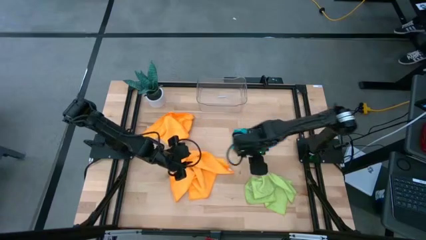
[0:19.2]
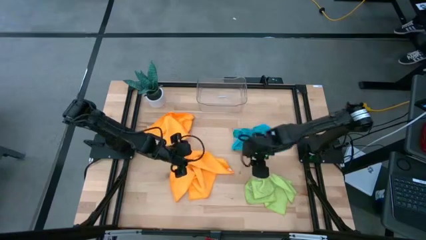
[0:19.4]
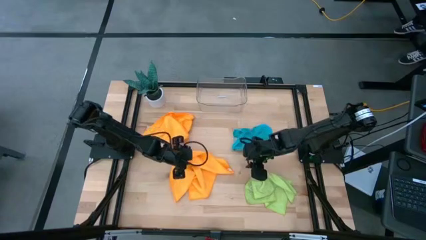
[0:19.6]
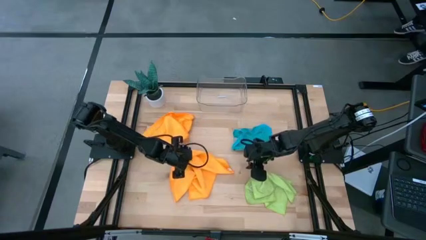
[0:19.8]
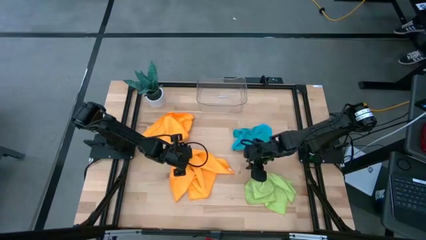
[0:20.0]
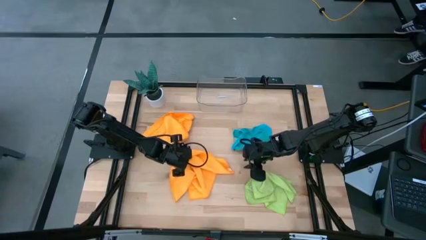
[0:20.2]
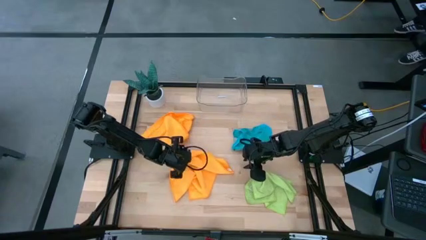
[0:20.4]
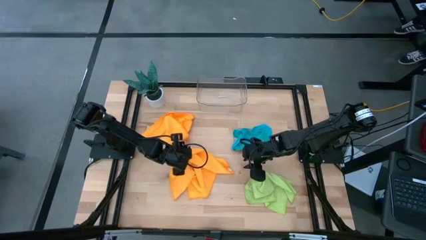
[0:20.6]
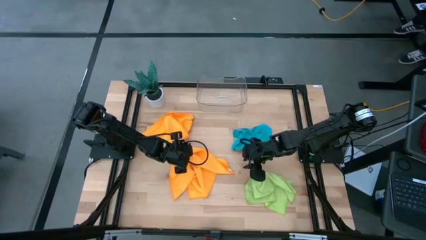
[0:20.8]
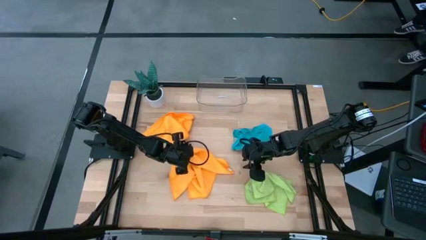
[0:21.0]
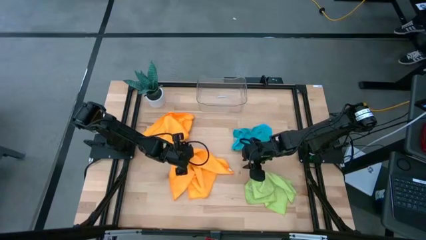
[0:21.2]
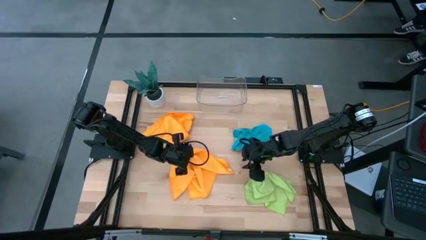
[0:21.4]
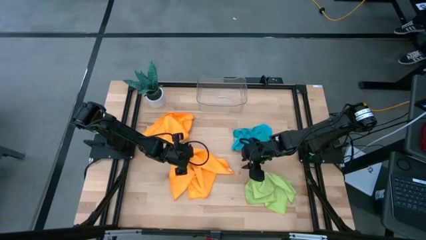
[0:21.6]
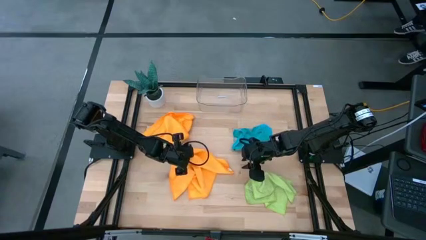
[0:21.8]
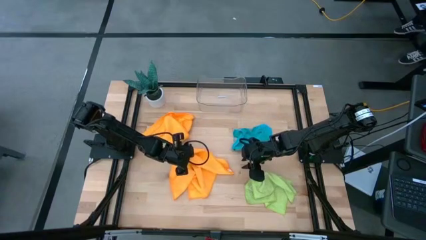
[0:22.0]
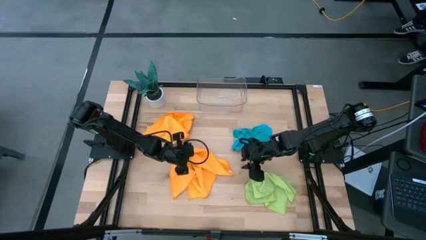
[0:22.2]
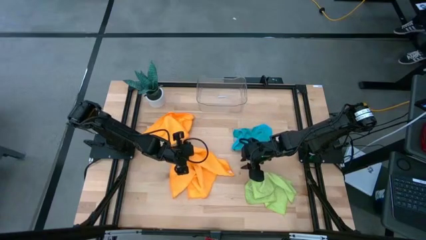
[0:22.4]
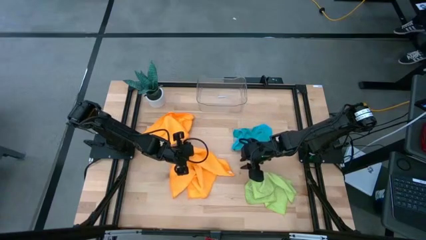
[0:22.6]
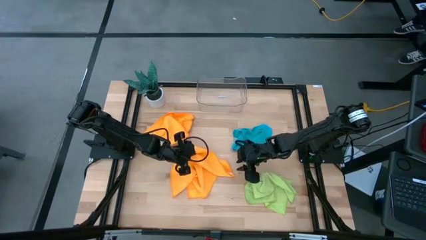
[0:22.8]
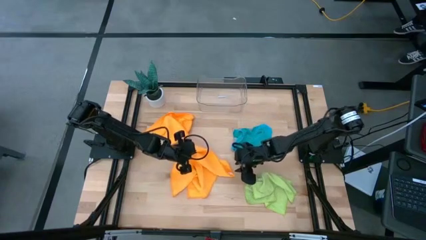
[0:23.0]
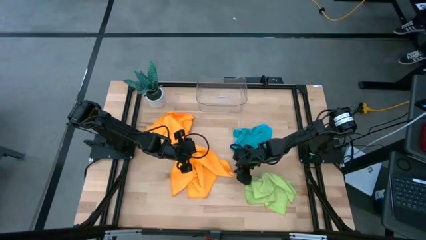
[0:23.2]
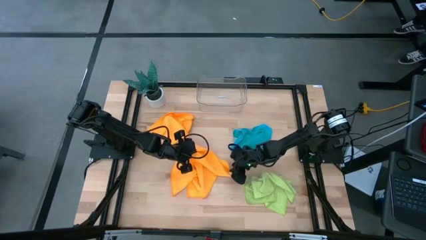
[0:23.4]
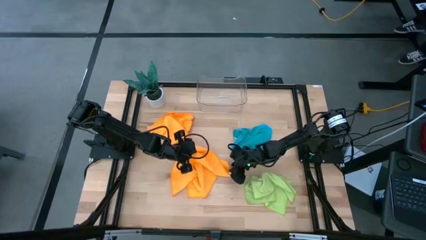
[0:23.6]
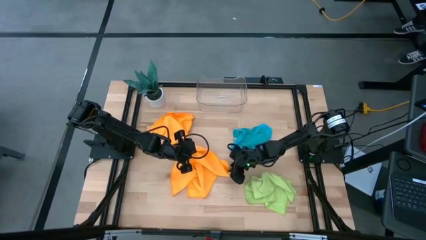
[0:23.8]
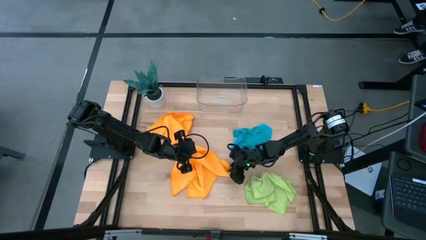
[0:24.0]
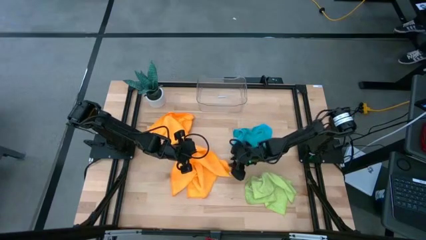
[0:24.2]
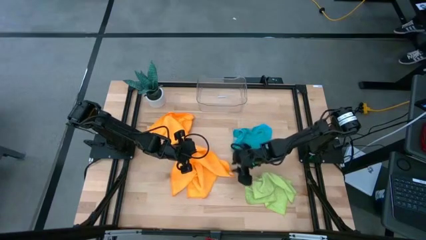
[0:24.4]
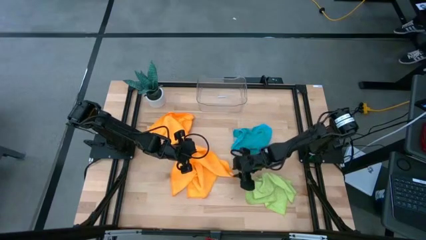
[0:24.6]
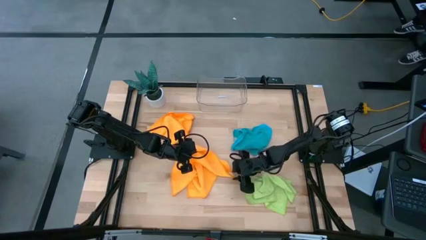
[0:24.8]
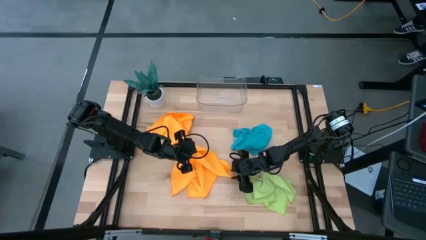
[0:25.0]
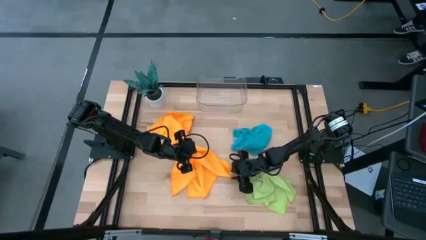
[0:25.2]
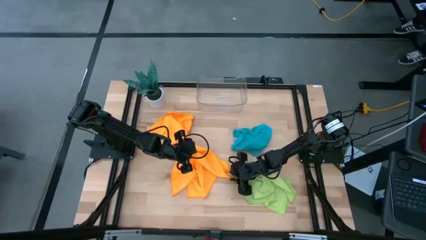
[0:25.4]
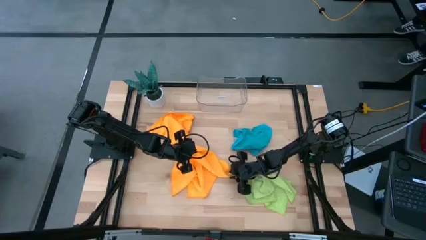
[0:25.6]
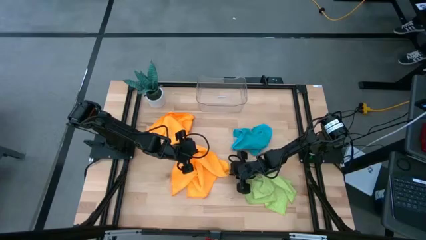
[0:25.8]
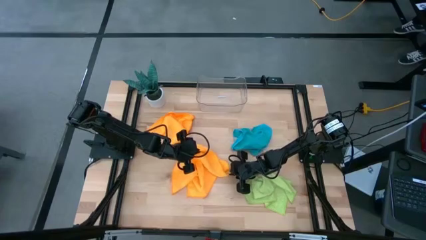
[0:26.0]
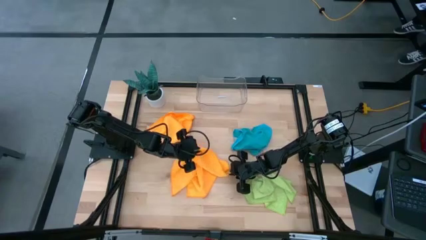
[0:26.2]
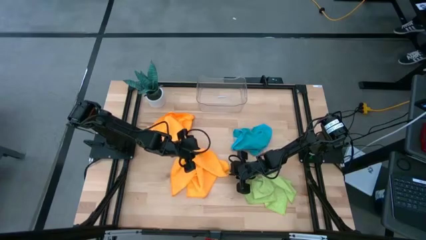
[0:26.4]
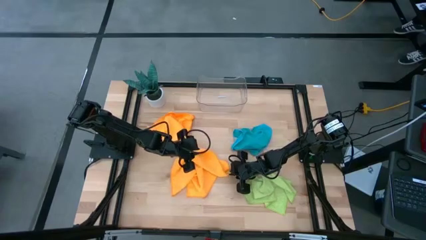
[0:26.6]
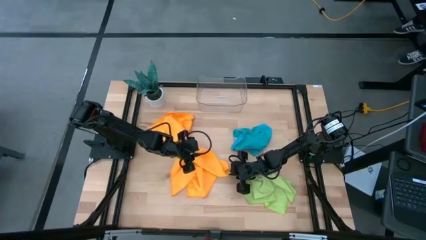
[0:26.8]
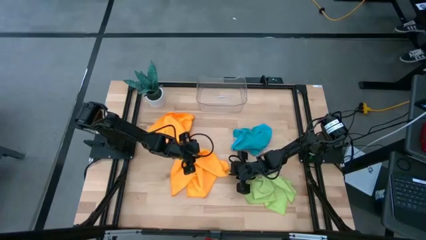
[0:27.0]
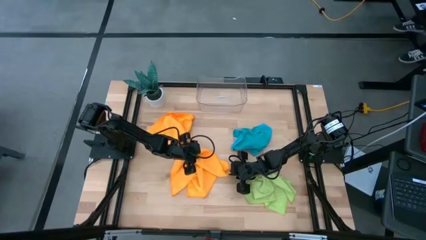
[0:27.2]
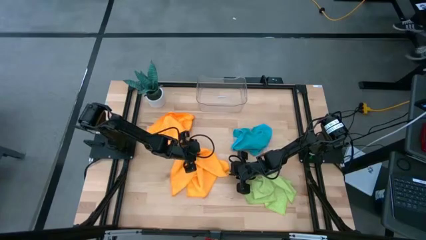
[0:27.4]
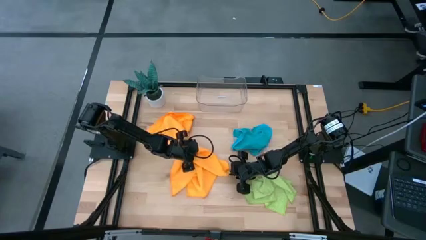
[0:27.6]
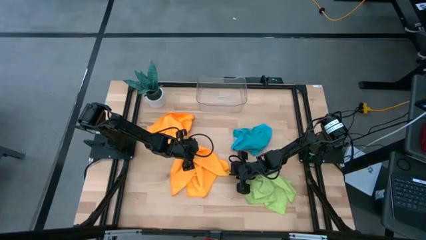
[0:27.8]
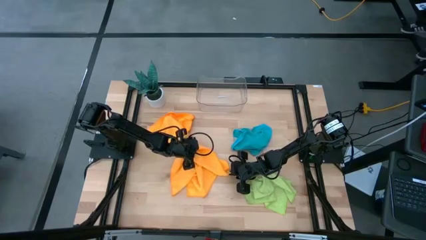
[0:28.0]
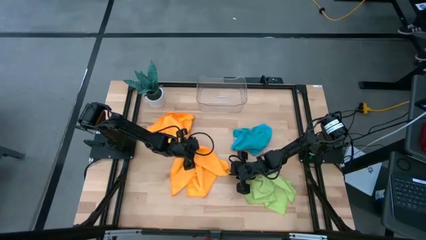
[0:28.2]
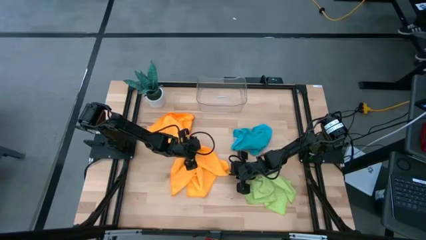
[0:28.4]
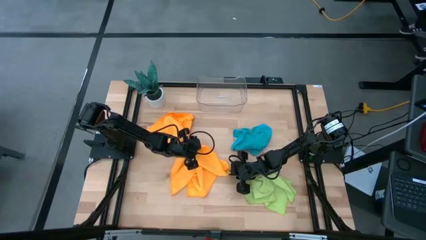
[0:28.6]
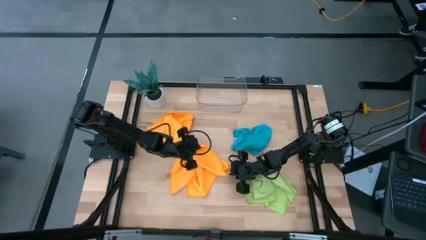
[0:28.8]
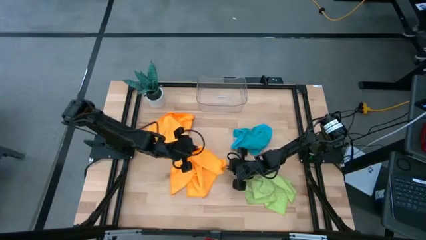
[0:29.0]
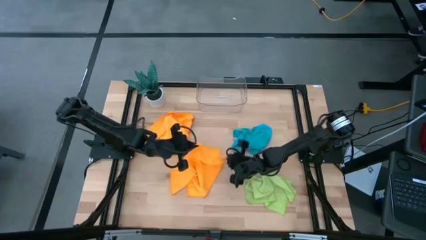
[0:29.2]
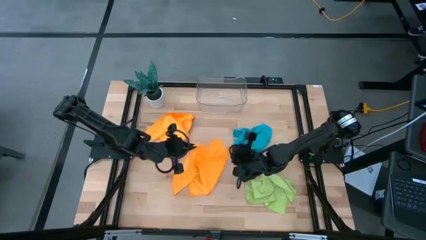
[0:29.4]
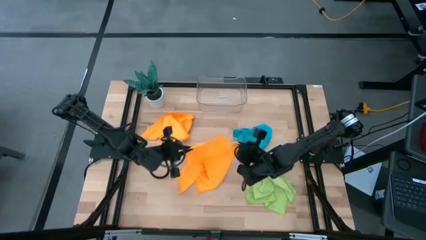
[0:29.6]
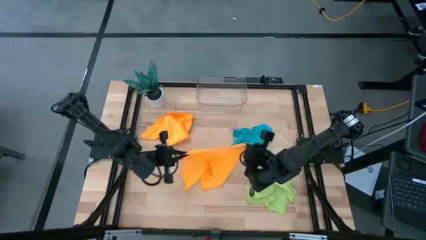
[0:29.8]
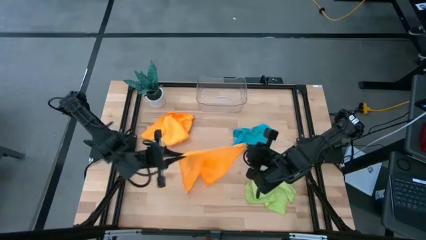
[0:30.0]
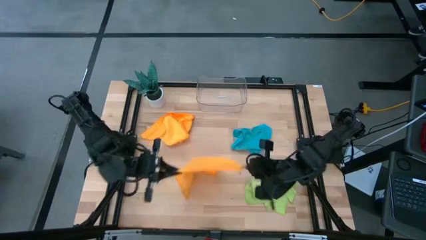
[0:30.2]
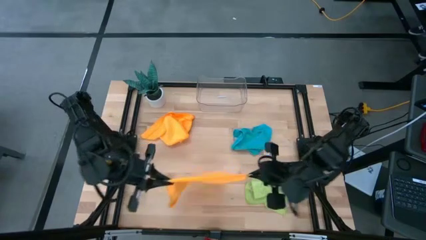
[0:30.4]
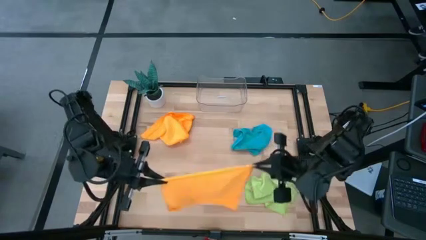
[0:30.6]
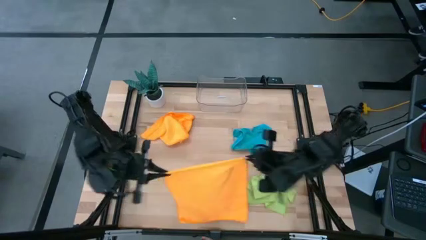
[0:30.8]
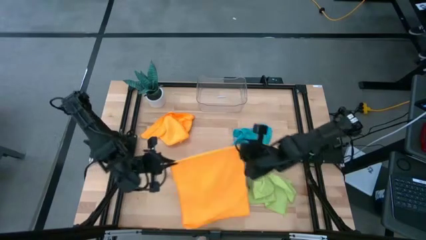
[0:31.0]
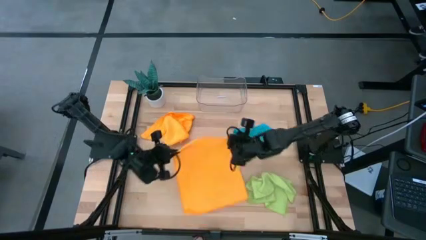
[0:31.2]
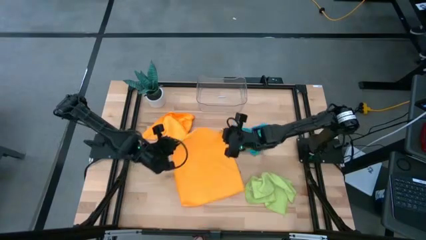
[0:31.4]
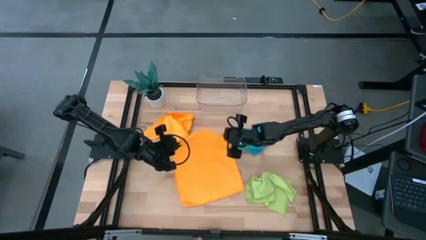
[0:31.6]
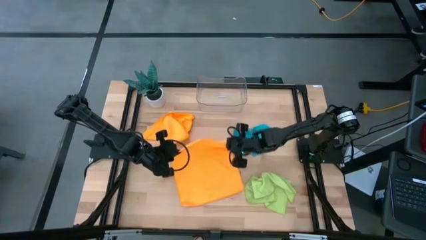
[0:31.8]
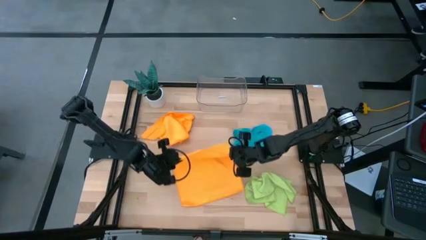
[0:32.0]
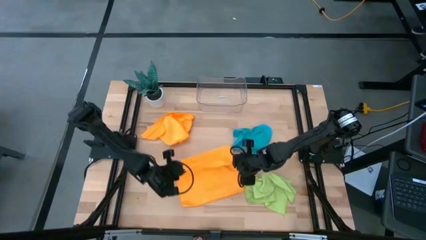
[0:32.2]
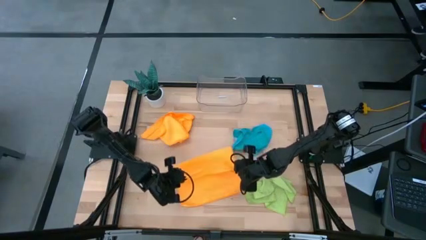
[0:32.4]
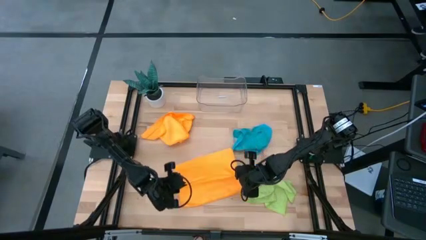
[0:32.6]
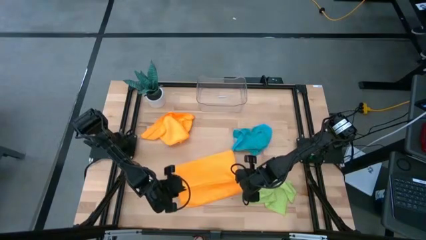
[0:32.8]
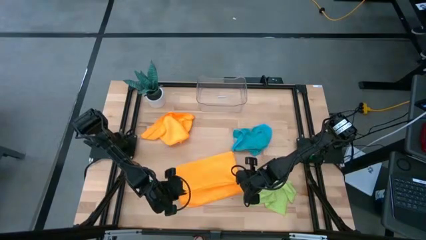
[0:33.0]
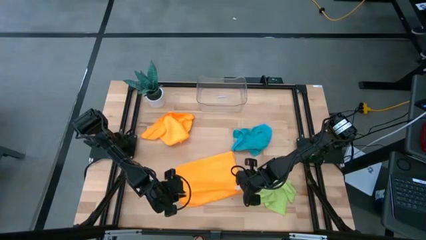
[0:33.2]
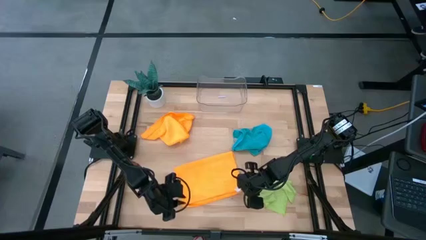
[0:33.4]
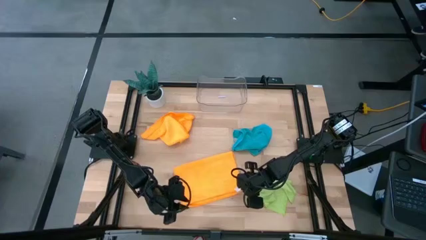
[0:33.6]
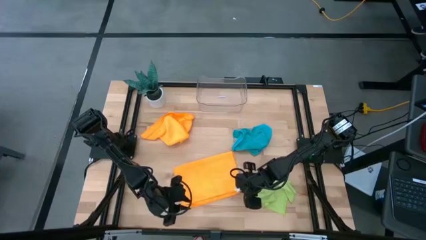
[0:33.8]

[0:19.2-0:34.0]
Task: Fold microfiber towels
Fold the bottom orange microfiber towel
